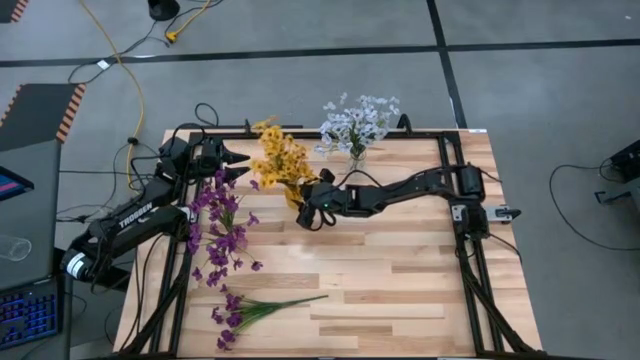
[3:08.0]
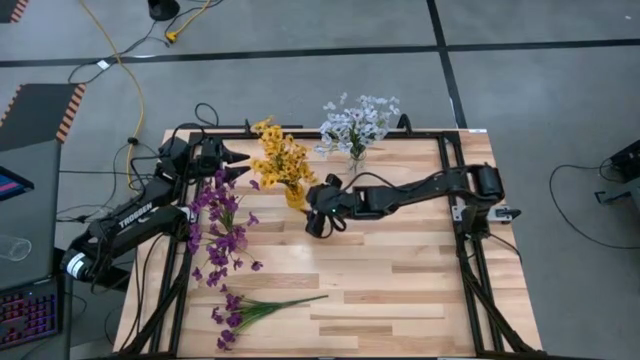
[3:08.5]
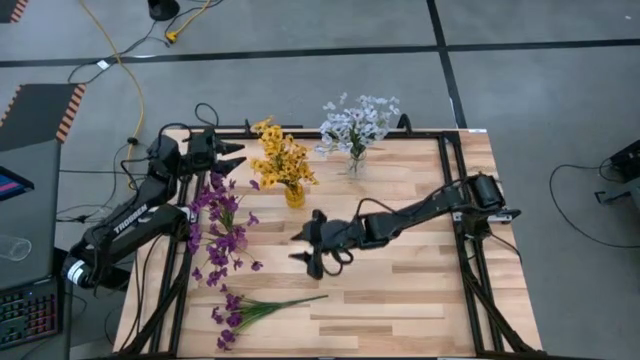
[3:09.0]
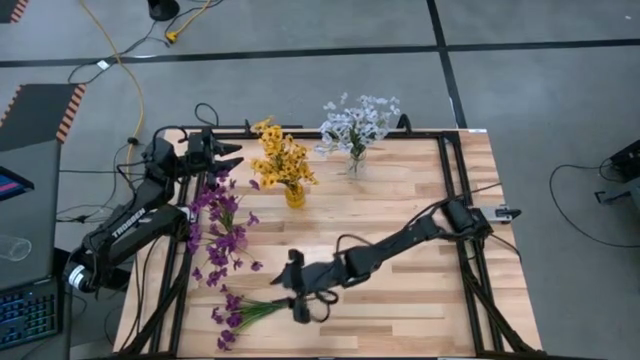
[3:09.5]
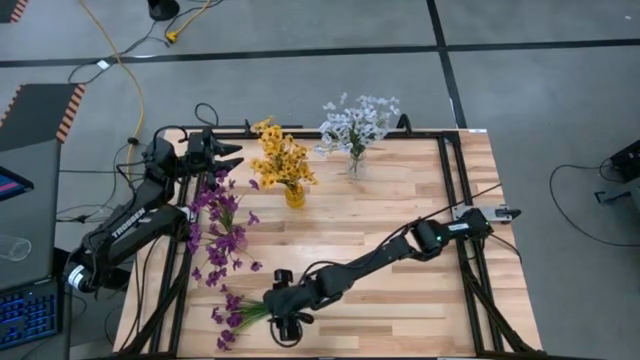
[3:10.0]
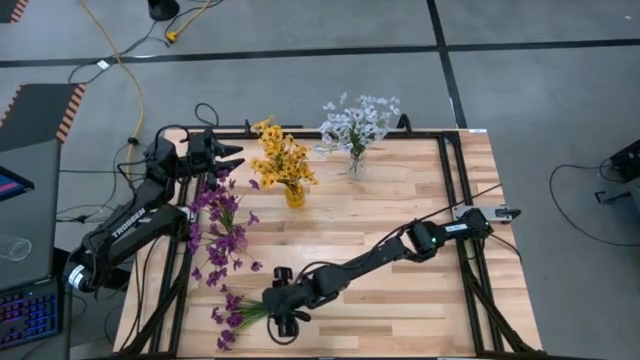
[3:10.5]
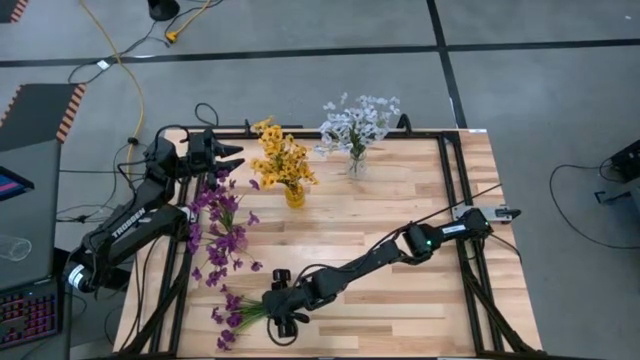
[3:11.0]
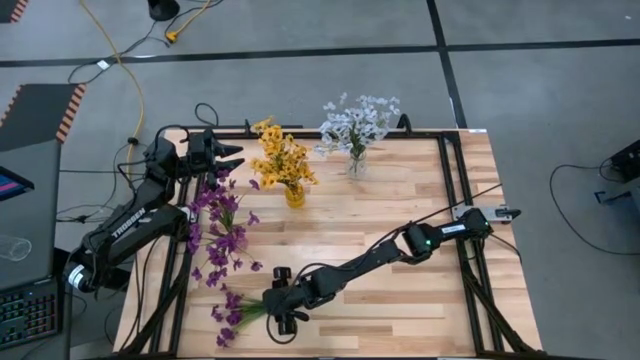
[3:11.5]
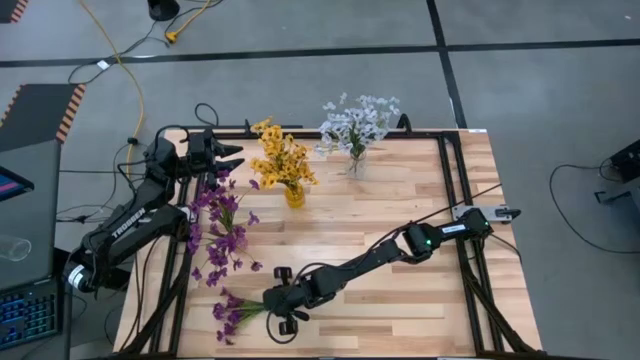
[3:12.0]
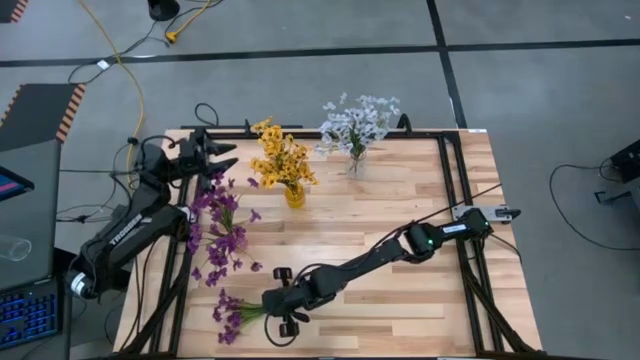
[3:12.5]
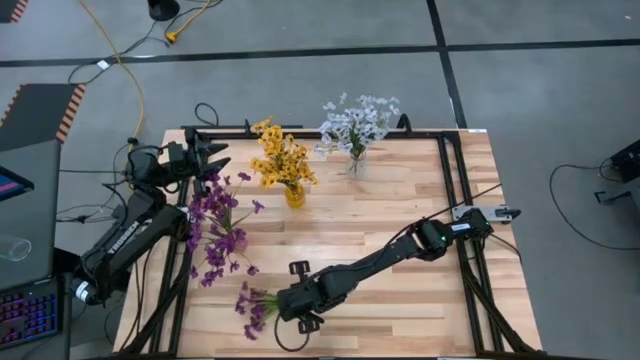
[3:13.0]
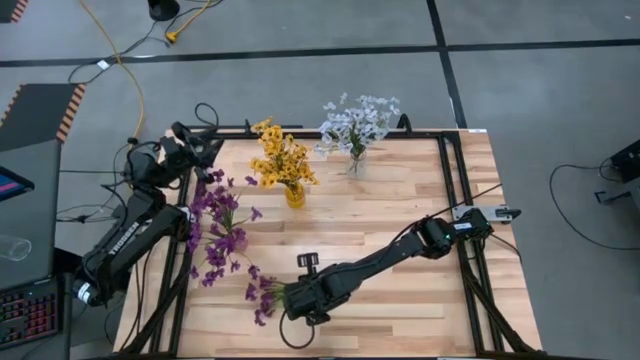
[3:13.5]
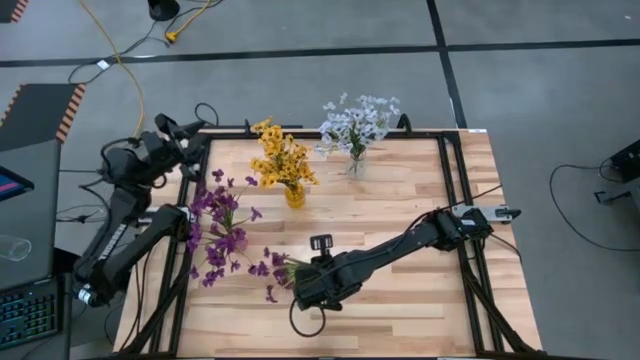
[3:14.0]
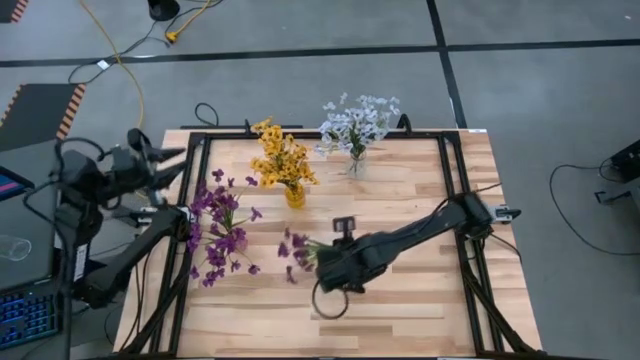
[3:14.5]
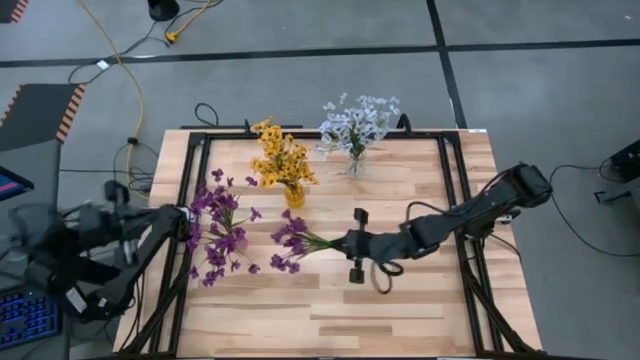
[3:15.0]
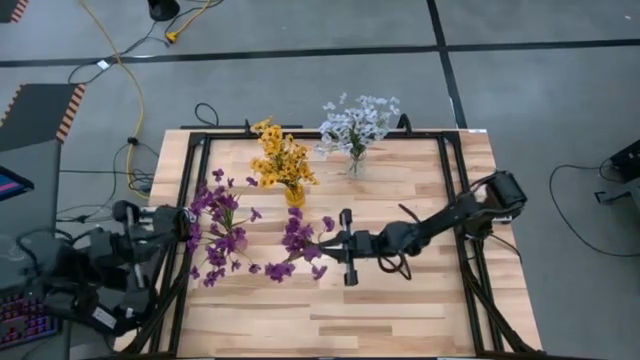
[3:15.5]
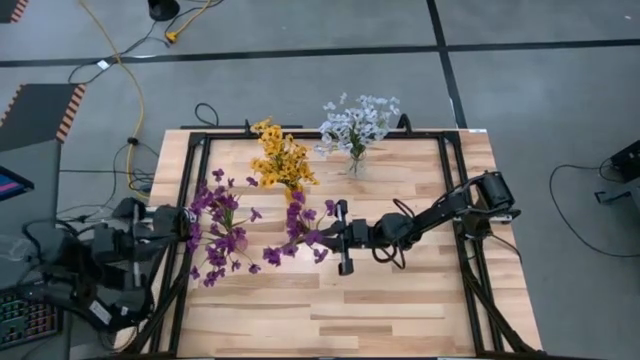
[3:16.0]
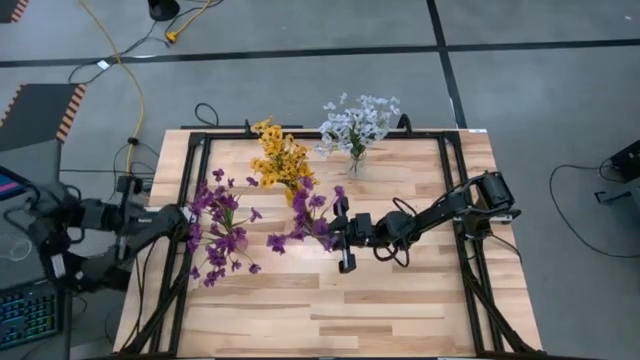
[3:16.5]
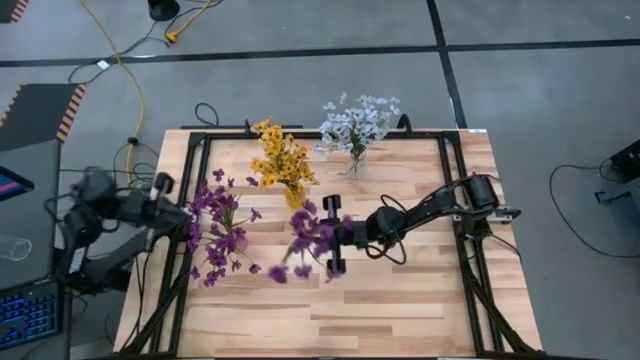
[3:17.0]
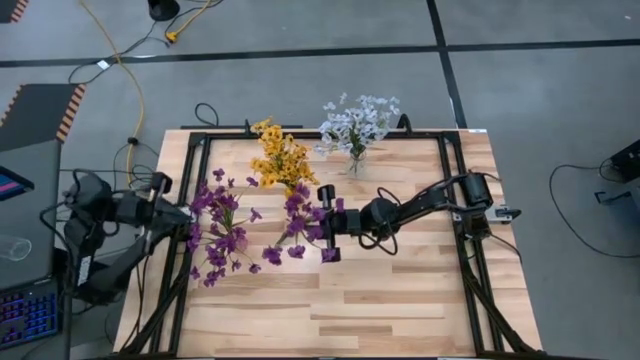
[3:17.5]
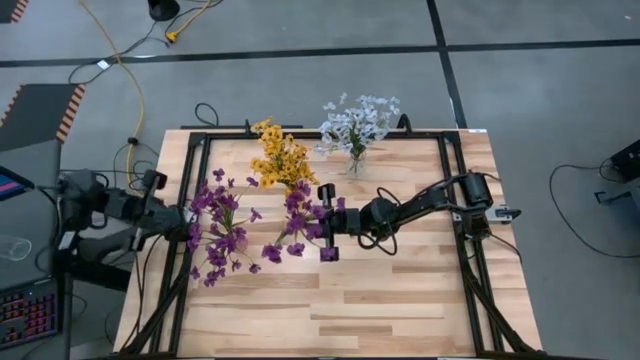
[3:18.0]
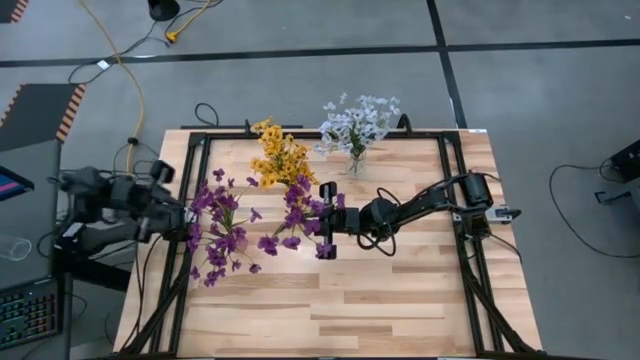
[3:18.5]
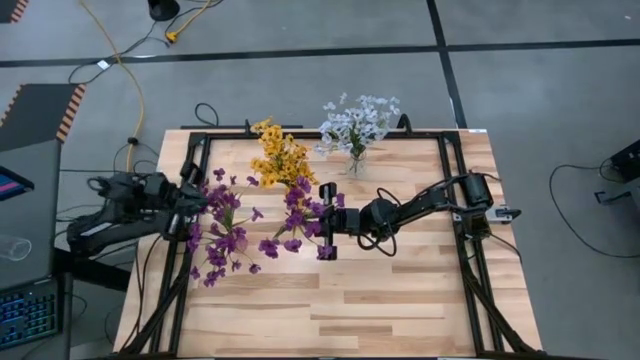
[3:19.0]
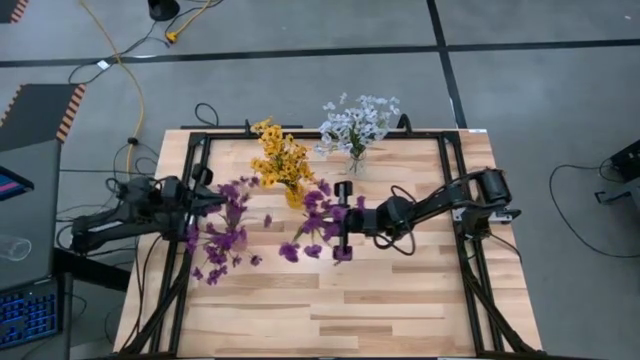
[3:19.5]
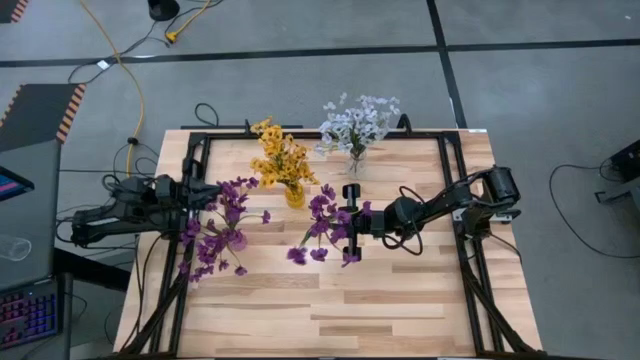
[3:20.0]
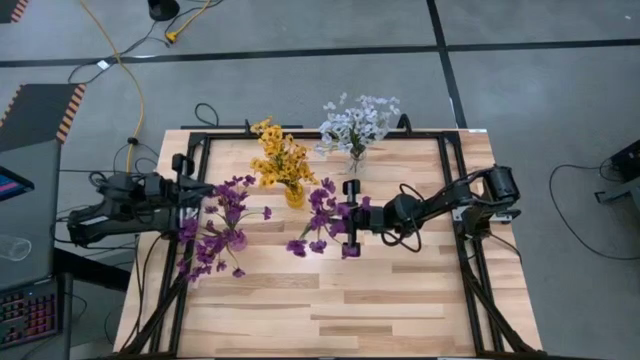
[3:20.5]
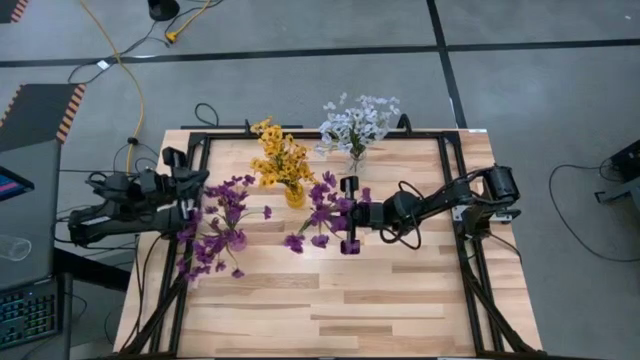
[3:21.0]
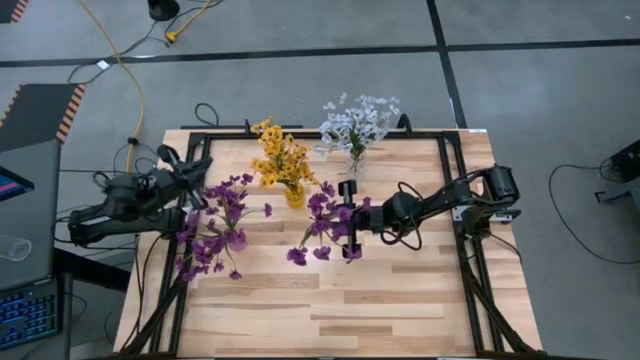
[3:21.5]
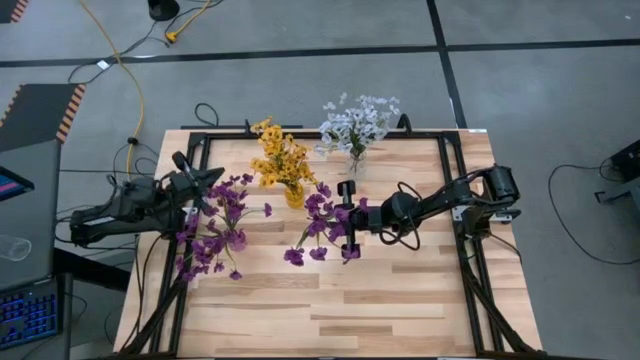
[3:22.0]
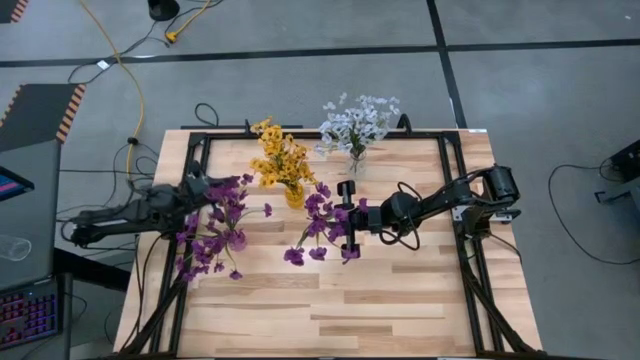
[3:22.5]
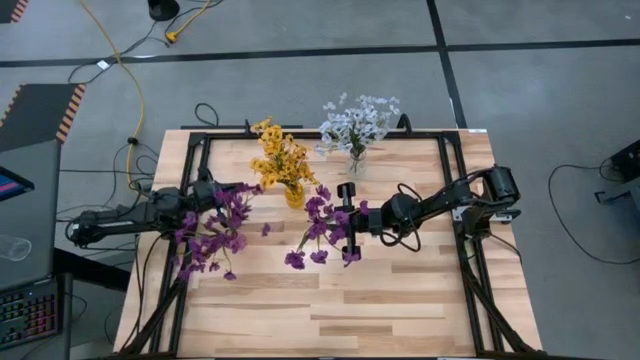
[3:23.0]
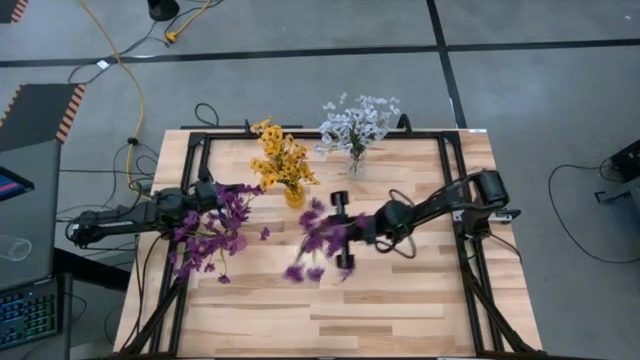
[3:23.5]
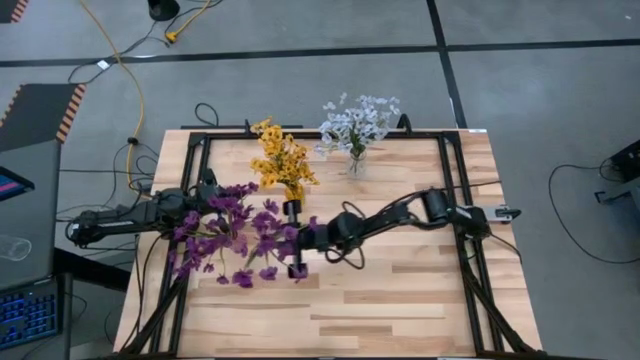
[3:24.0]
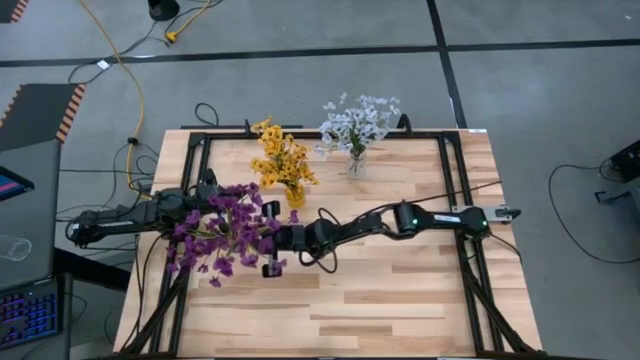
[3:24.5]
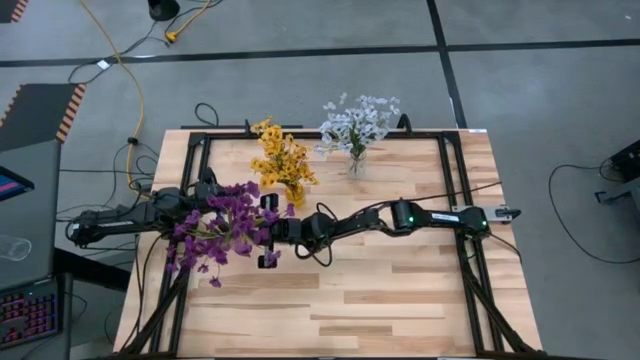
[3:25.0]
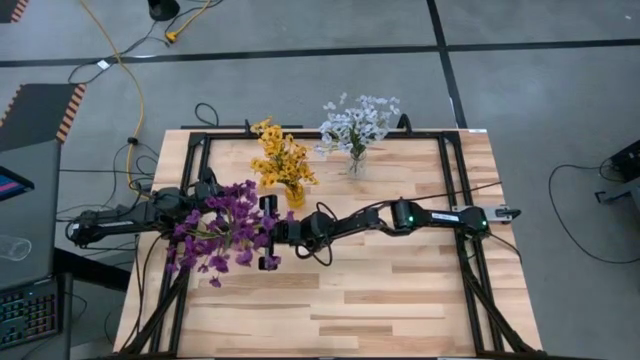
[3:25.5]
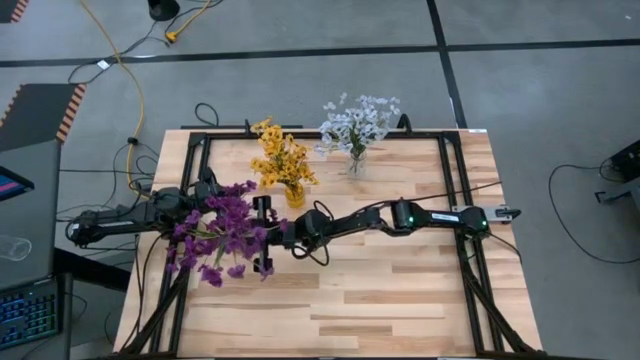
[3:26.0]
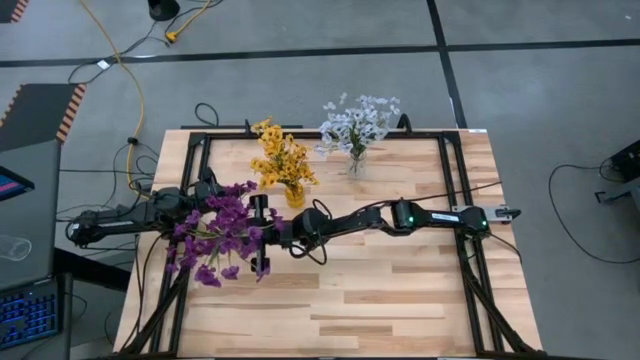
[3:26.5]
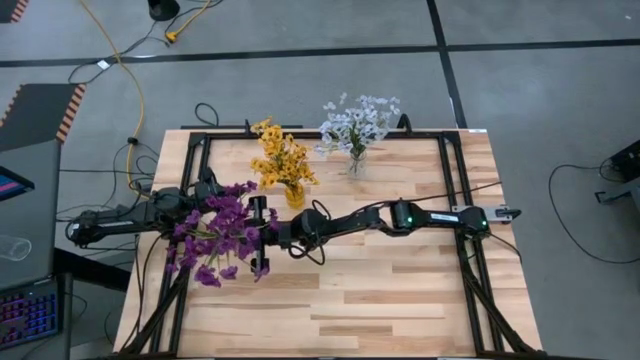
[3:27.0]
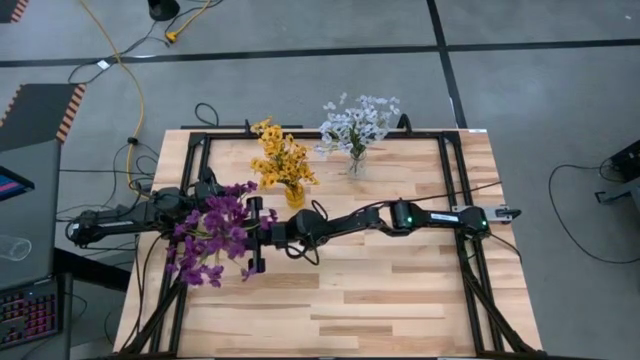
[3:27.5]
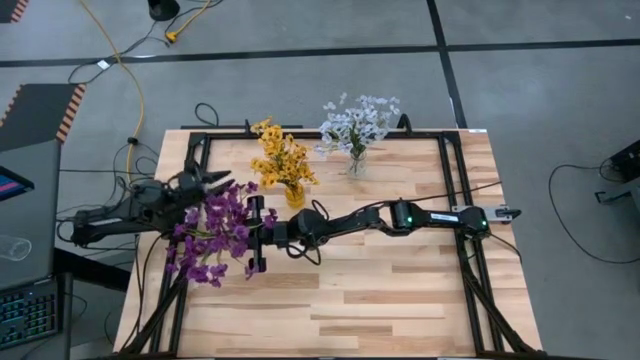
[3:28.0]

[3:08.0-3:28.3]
Task: Sort flowers into vase by color
Put the violet flowers into the violet vase

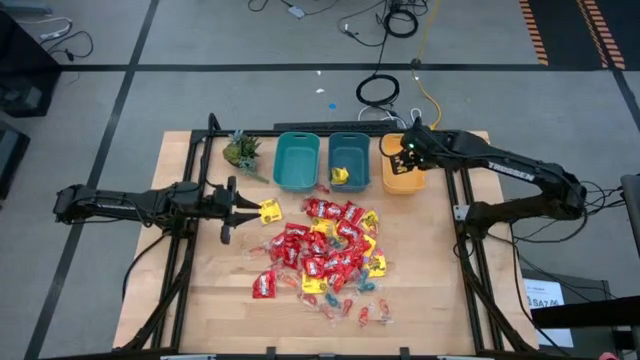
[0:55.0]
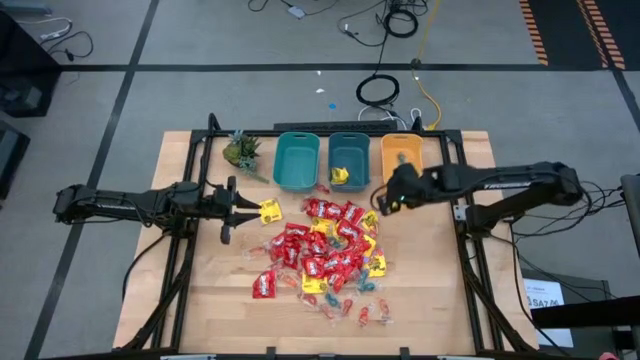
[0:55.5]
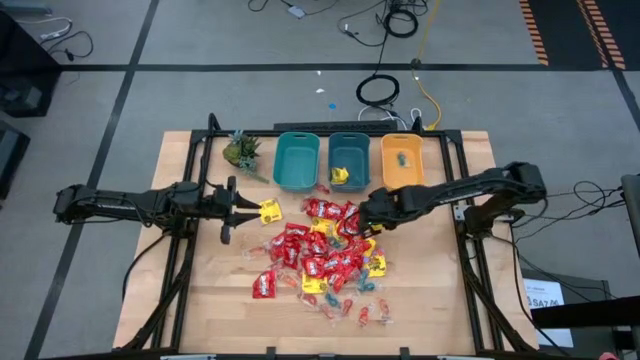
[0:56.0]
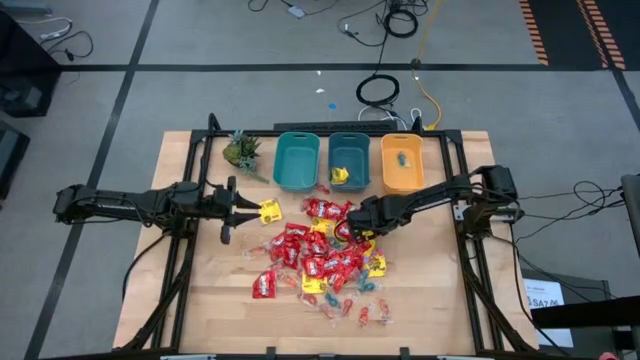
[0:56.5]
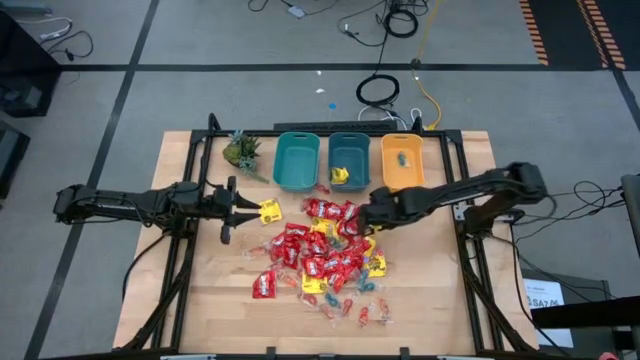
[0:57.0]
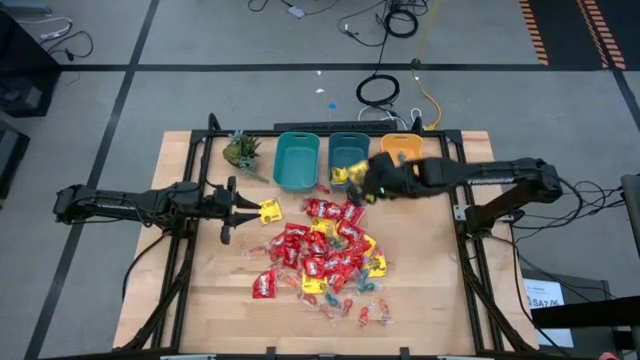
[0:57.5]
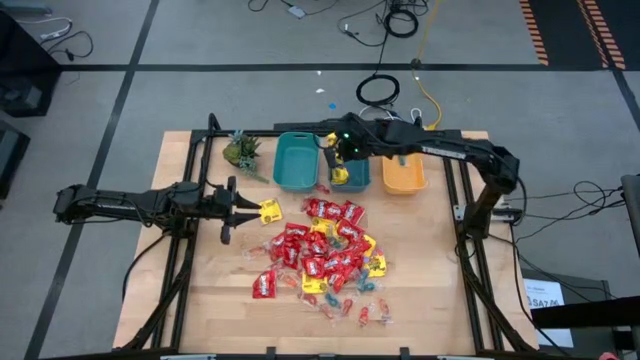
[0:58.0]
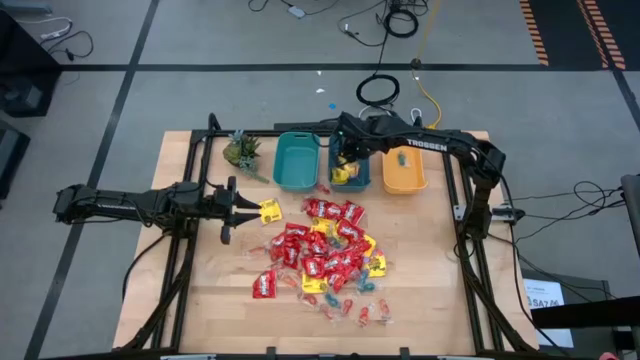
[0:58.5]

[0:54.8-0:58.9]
Task: Sort candy
Put the yellow candy into the blue bin
